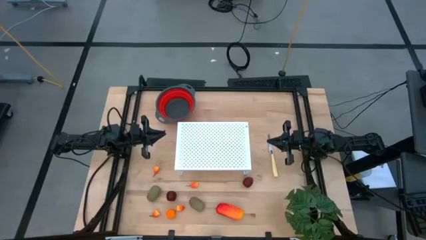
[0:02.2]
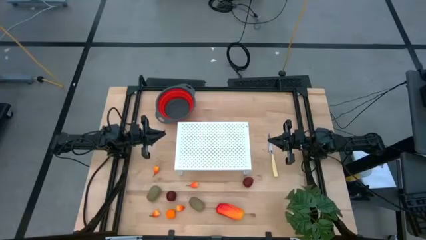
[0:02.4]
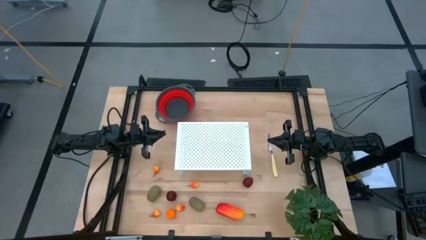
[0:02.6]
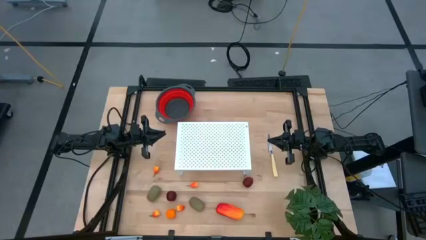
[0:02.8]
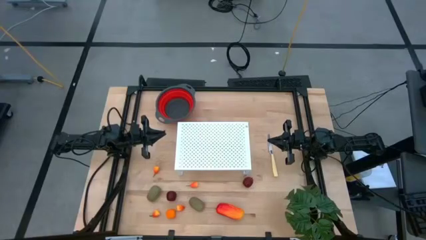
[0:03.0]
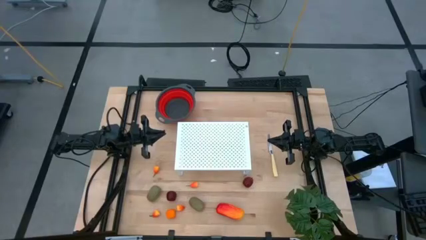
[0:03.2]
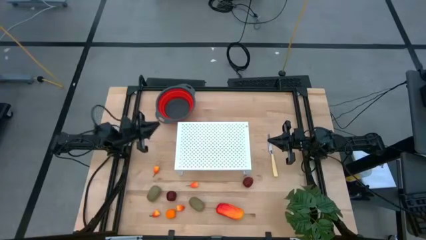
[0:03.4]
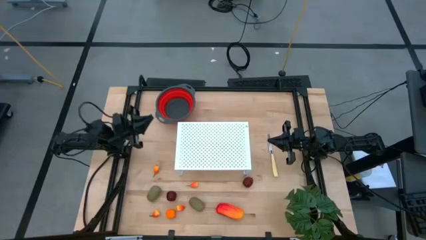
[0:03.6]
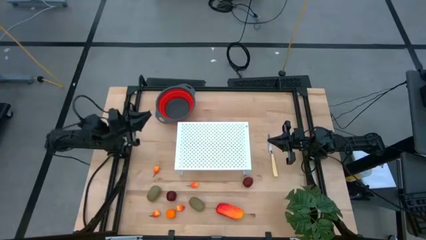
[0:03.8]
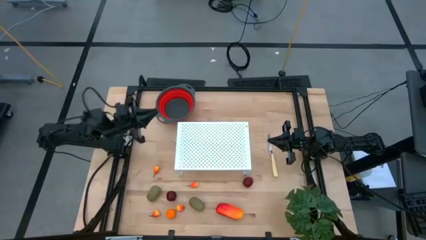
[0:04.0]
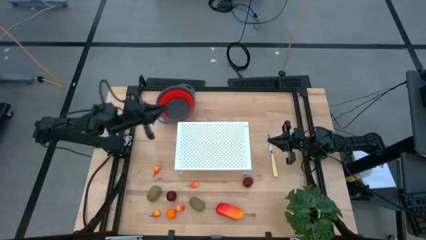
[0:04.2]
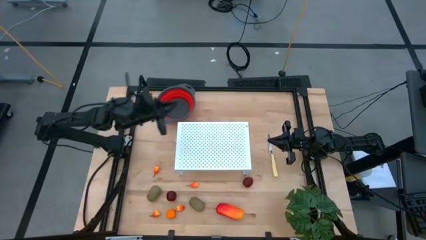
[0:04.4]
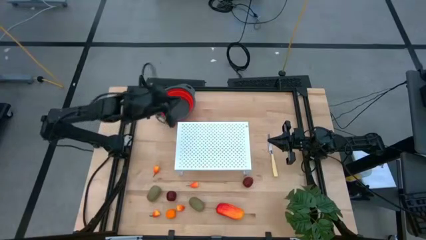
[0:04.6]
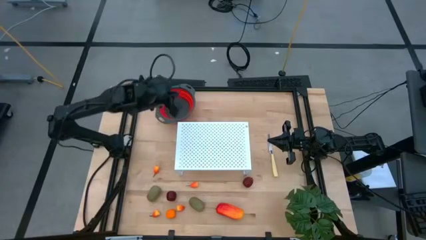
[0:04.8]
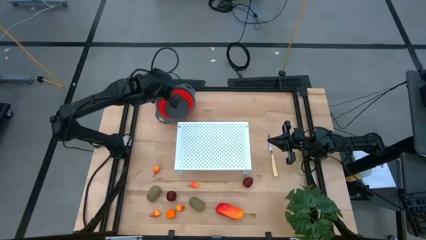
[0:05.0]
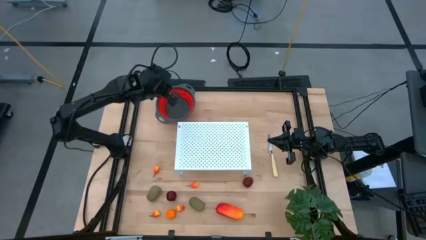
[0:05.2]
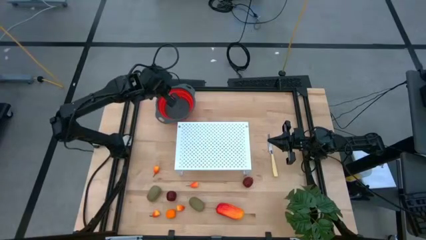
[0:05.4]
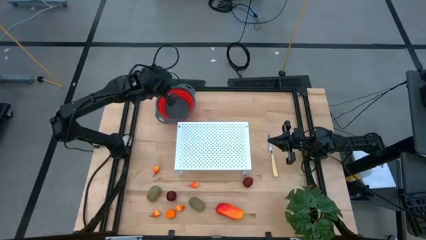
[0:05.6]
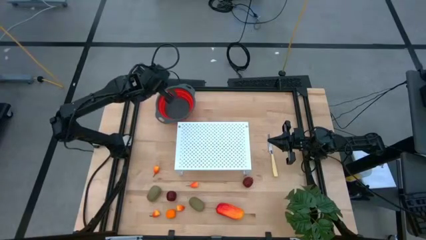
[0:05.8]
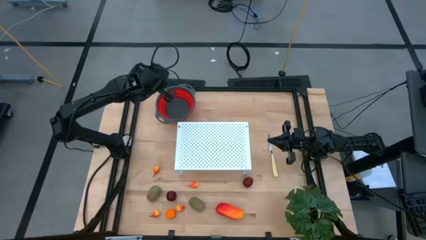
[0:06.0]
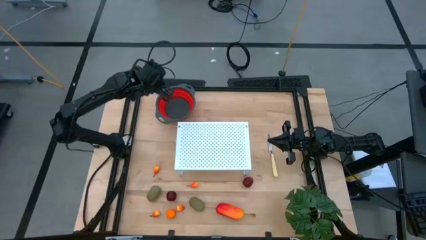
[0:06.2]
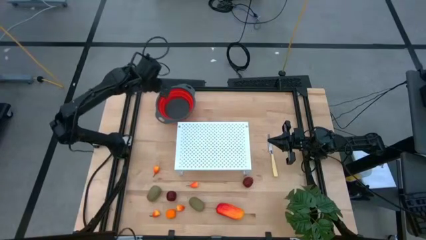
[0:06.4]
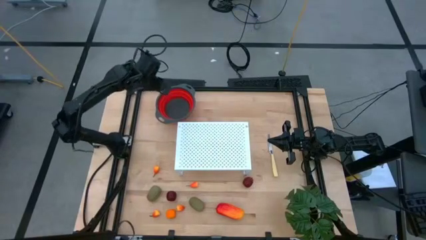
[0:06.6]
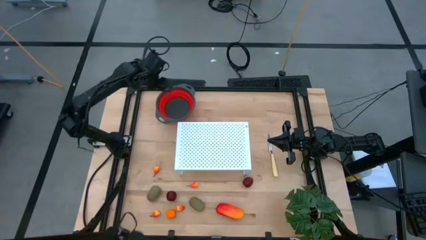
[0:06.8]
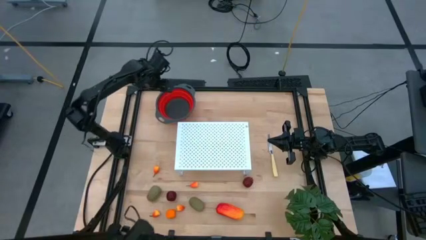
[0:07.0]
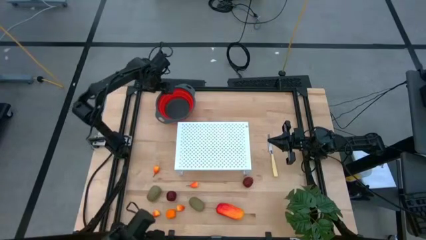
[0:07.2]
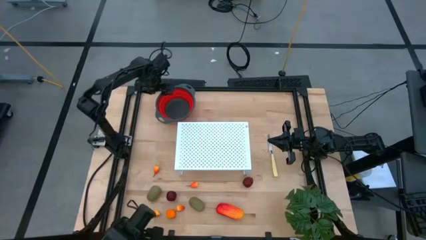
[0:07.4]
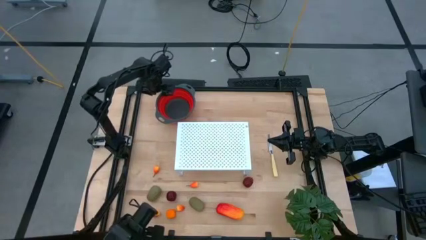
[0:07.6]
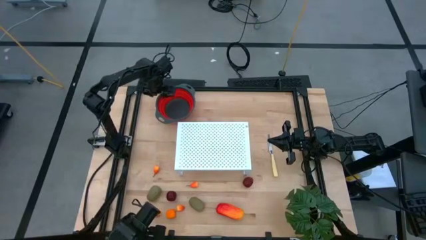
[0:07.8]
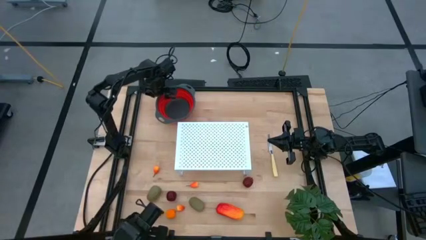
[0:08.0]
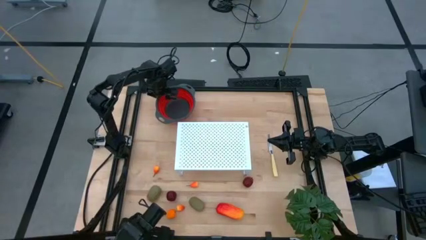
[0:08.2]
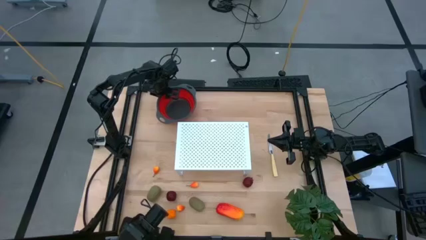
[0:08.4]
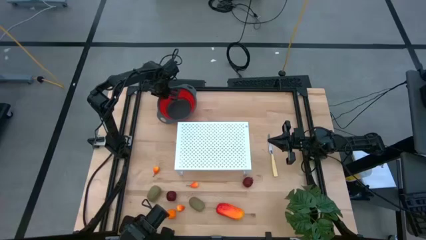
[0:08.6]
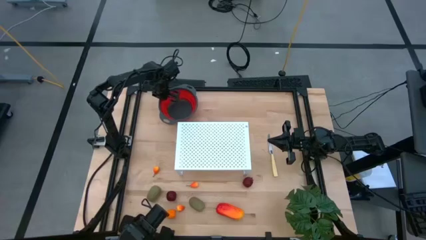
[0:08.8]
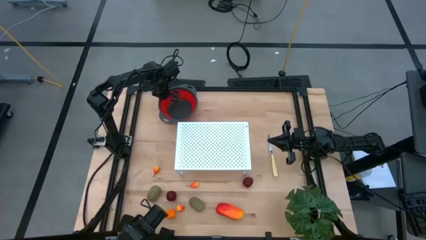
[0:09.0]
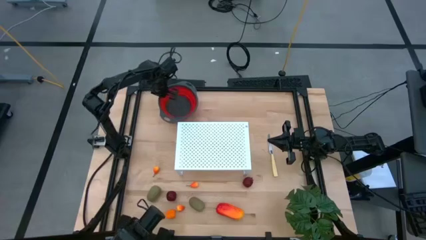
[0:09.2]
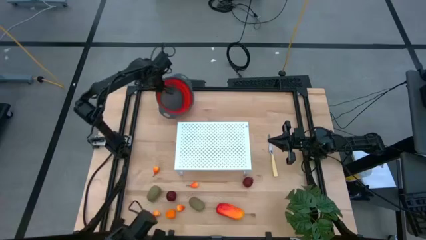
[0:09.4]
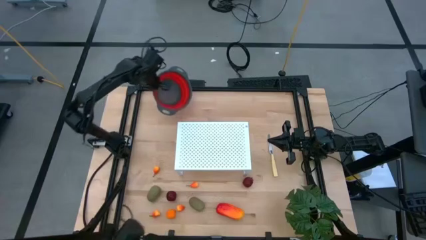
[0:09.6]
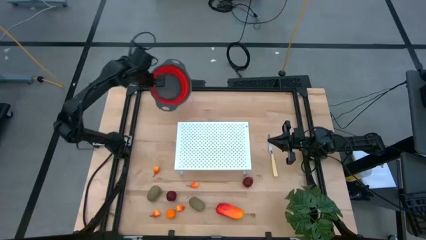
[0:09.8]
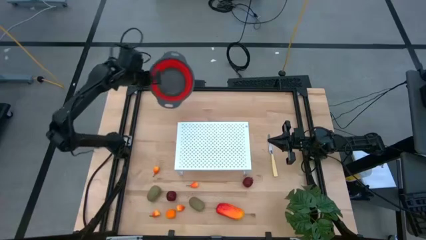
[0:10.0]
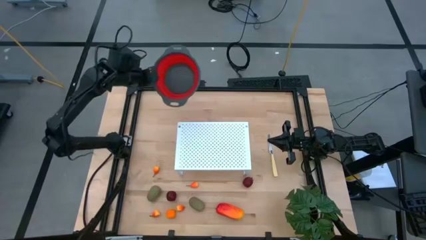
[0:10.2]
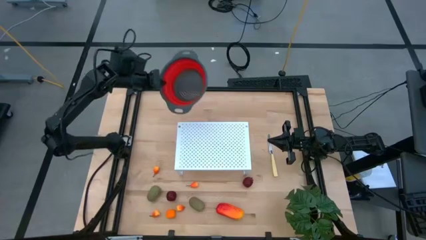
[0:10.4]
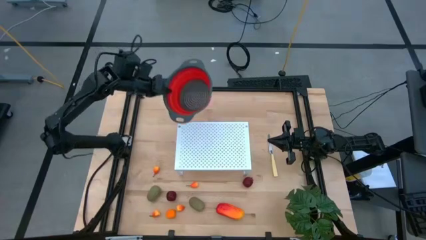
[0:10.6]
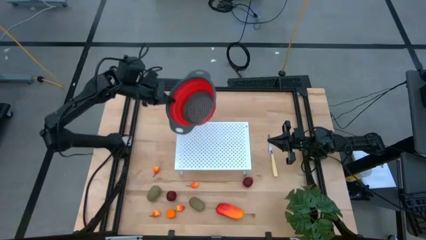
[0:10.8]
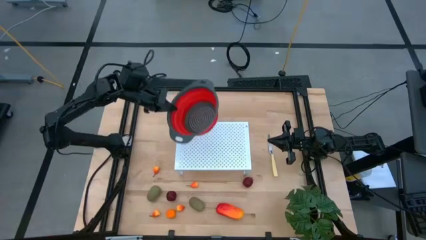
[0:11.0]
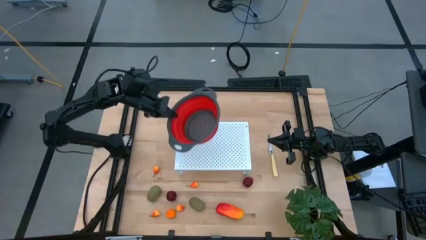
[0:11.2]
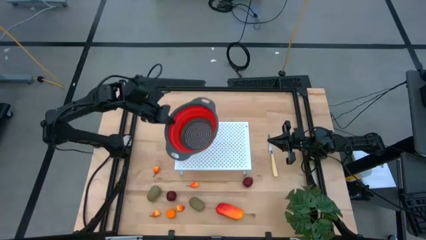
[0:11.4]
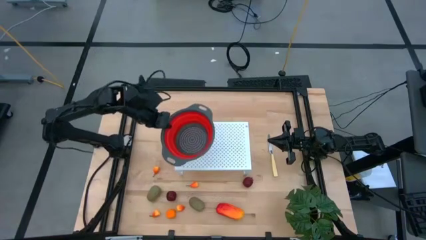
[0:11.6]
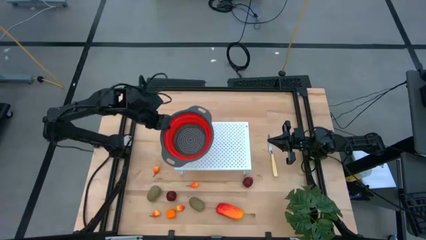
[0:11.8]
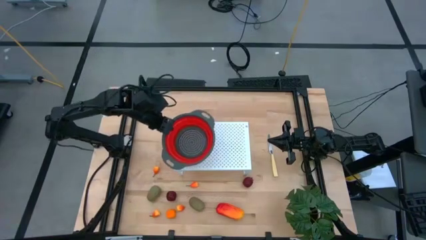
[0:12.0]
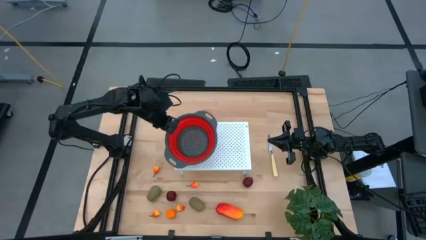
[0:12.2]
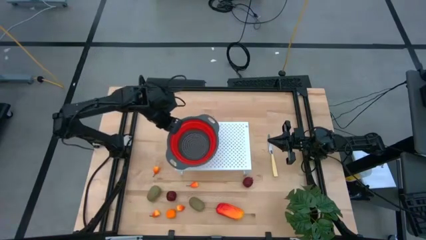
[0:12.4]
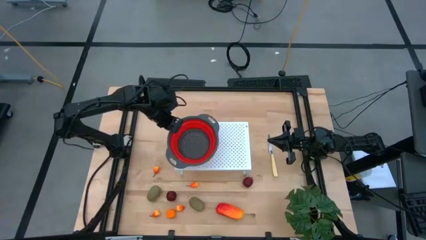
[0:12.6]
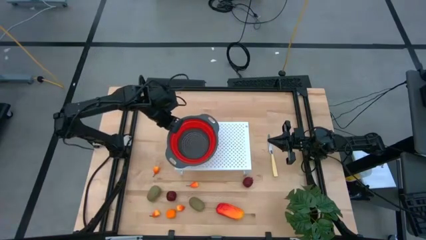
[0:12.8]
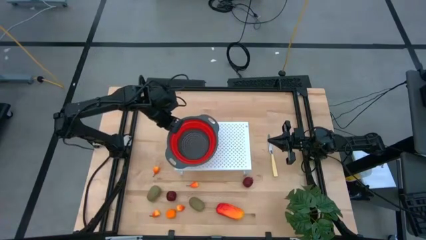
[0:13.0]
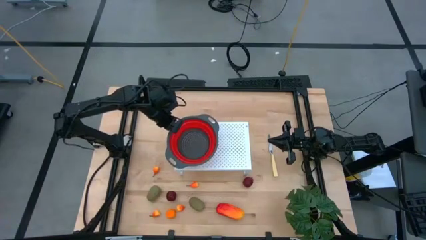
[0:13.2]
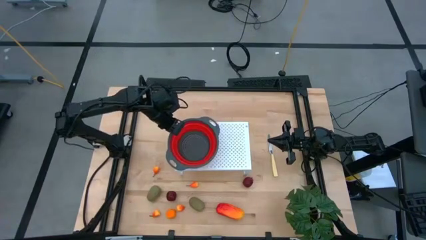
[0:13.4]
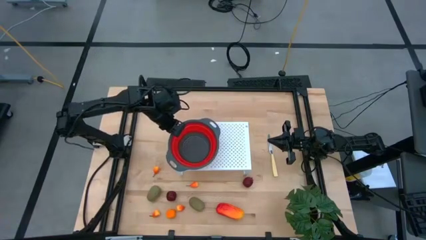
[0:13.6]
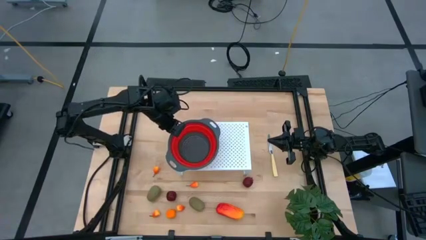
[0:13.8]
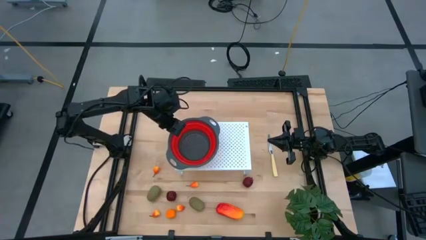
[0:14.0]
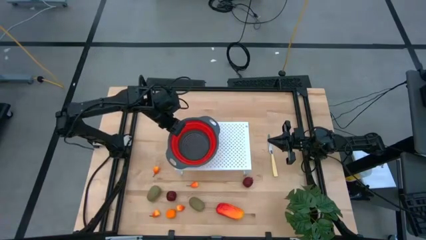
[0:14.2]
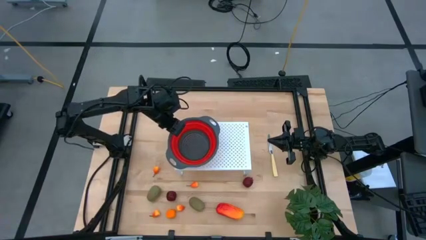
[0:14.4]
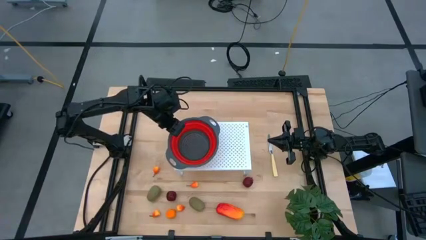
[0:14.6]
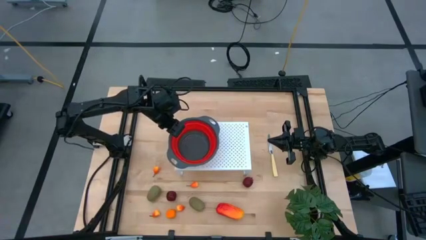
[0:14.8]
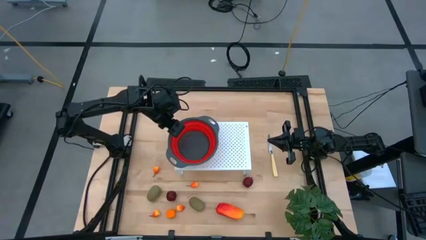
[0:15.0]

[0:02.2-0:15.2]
Task: Pick & Place Fruit
Put the red strainer bowl on the shelf
